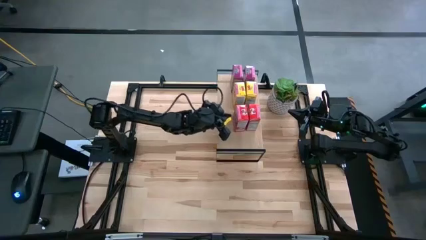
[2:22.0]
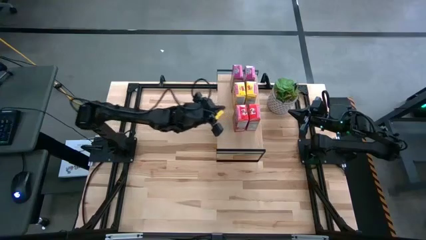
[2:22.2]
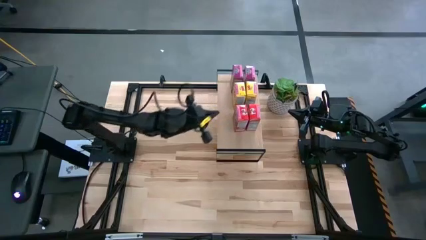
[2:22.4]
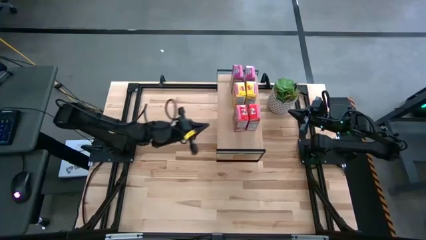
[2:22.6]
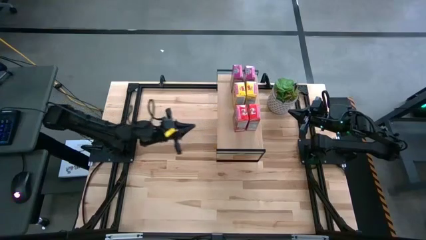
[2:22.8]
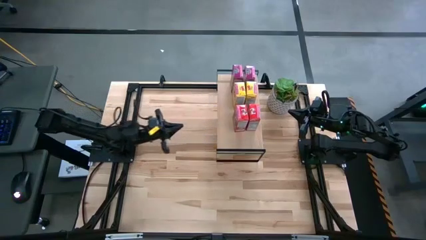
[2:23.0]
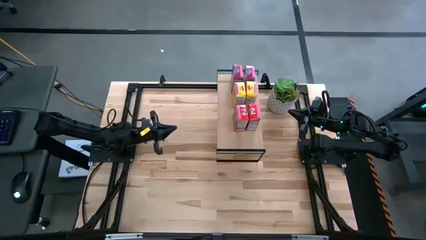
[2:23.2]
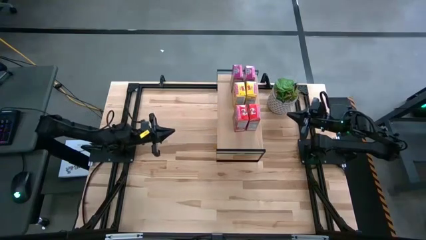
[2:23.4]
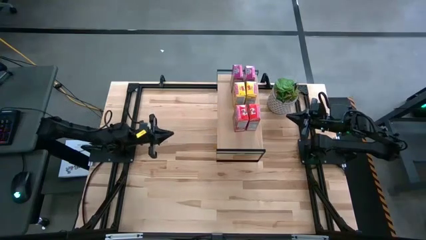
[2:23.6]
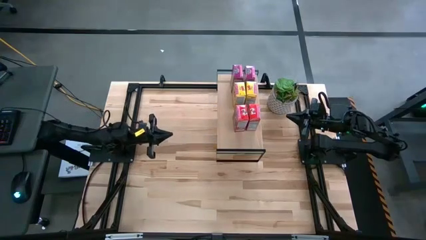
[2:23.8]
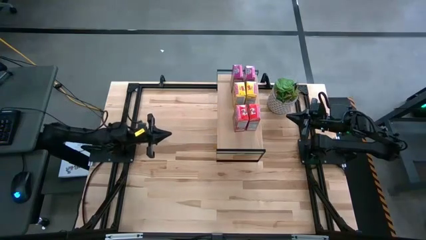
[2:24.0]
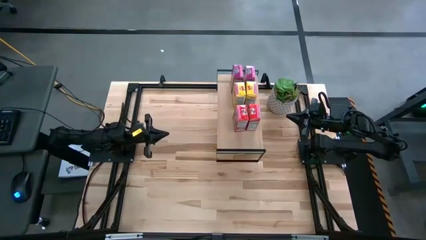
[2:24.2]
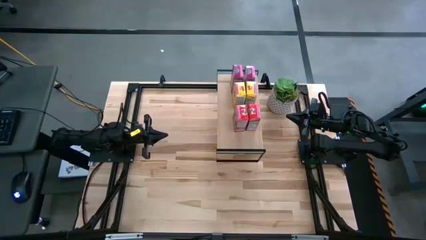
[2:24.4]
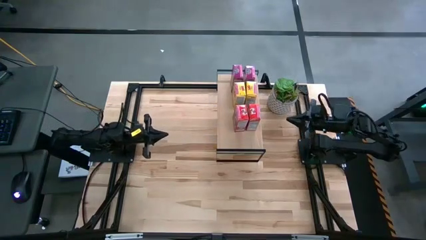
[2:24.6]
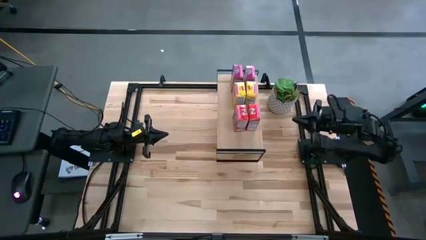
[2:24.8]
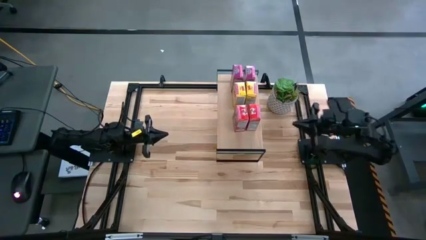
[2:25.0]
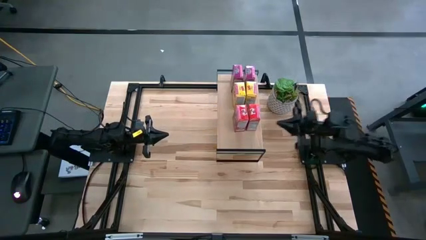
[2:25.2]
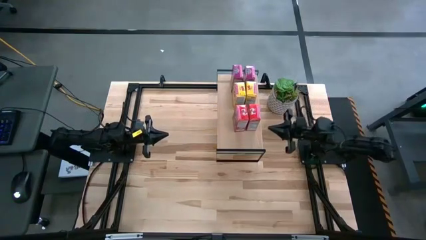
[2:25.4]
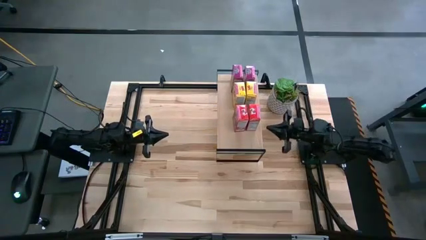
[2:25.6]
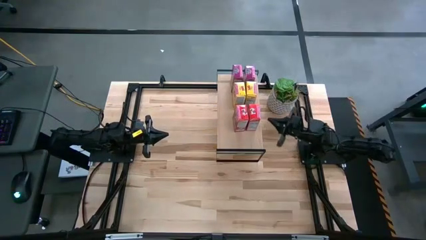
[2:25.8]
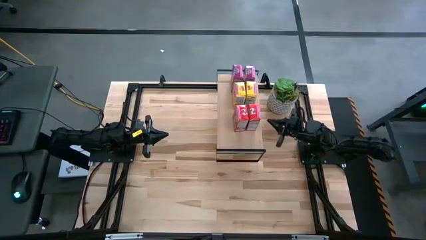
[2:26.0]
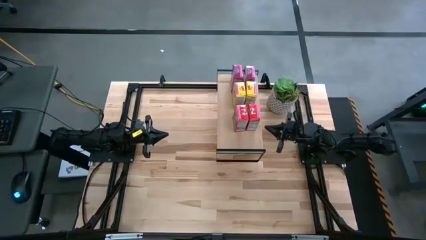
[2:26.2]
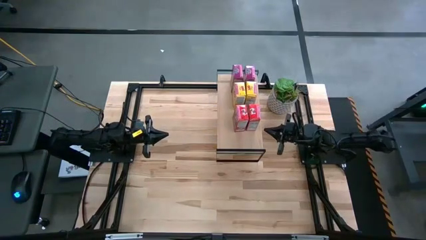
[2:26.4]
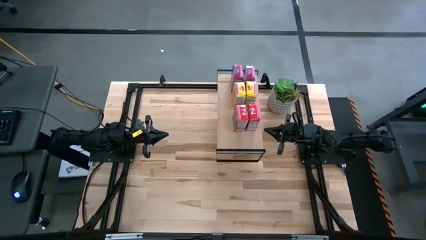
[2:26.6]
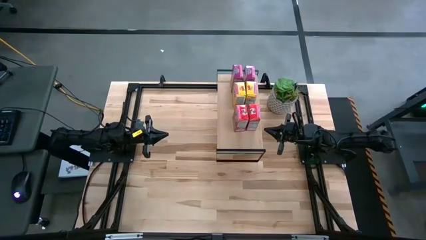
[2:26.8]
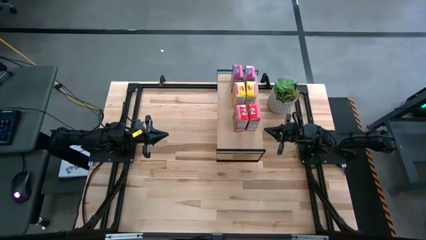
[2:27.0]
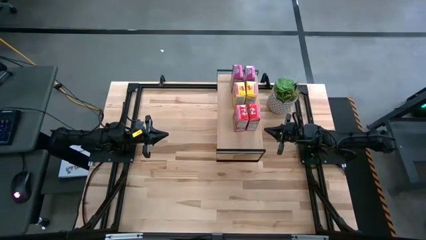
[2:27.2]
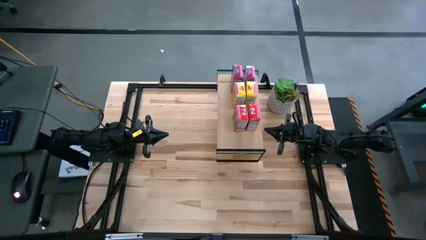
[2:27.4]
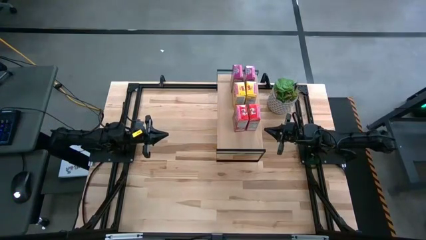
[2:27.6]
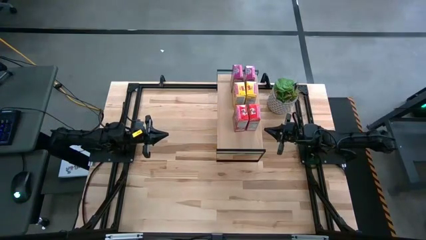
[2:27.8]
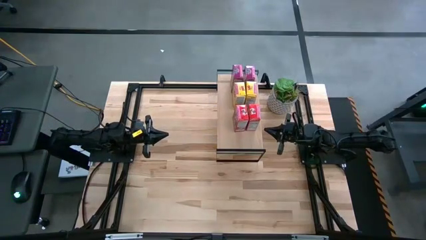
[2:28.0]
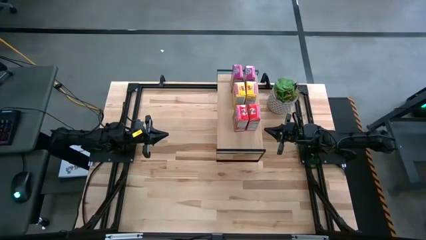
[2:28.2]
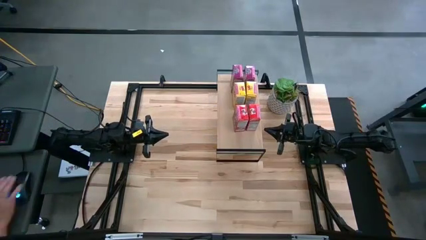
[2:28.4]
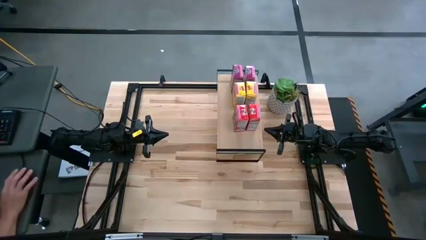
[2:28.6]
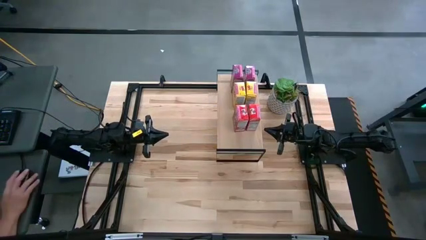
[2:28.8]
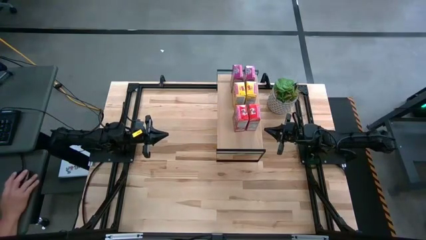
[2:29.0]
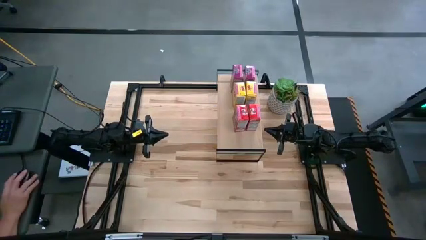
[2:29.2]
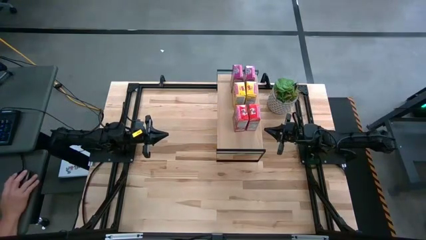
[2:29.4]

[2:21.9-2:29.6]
Task: Stack cereal on shelf
Return to Home Position

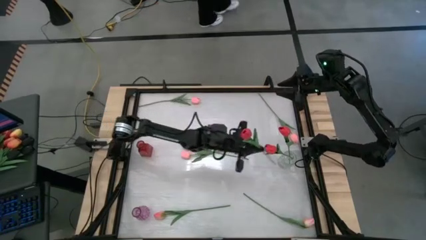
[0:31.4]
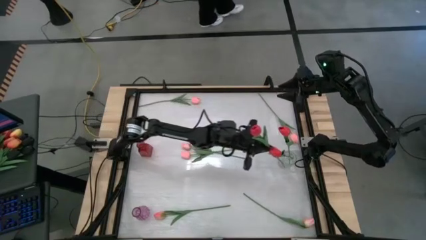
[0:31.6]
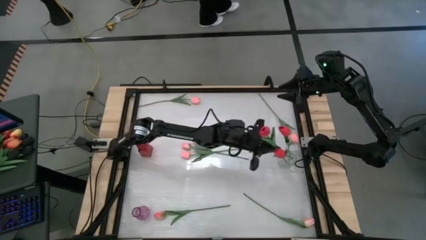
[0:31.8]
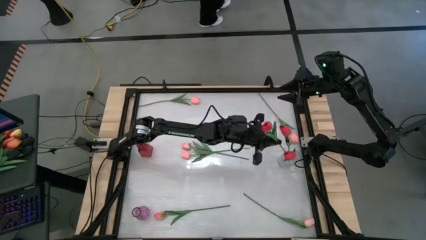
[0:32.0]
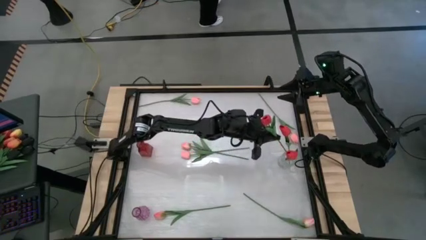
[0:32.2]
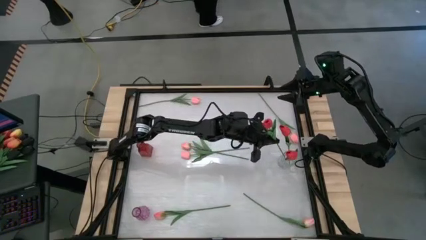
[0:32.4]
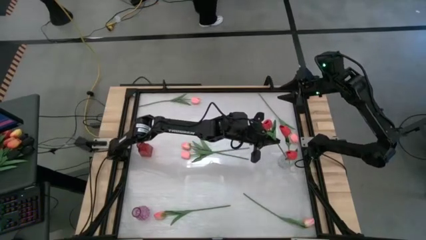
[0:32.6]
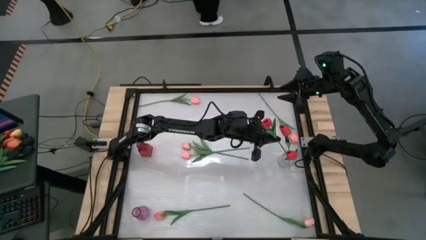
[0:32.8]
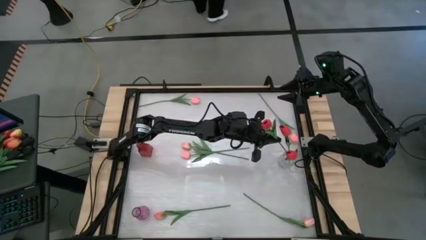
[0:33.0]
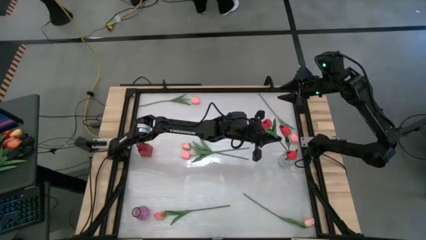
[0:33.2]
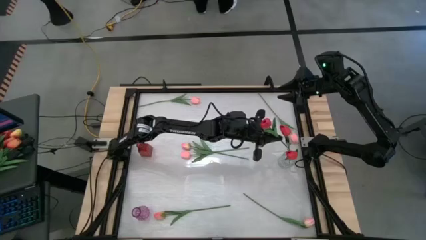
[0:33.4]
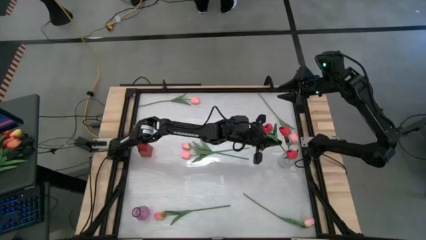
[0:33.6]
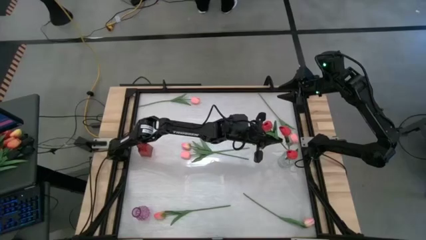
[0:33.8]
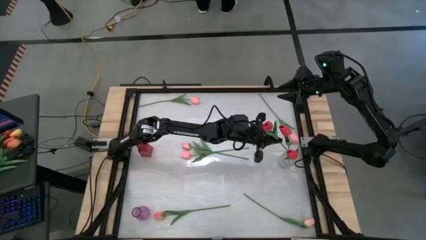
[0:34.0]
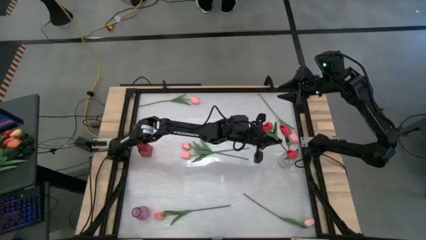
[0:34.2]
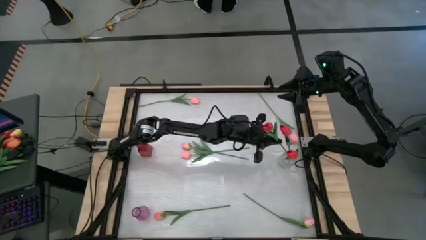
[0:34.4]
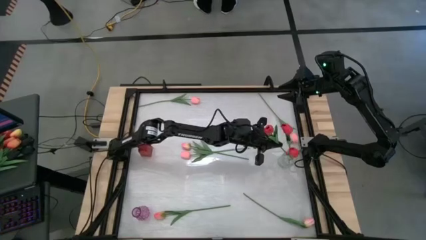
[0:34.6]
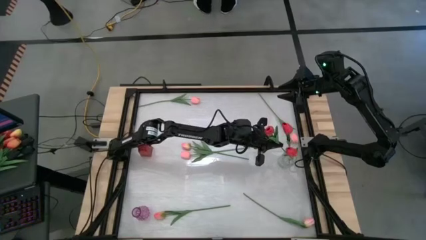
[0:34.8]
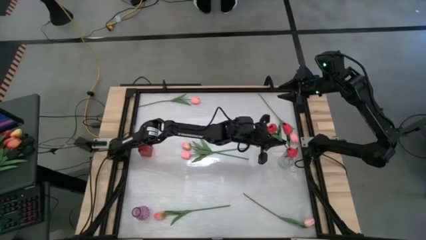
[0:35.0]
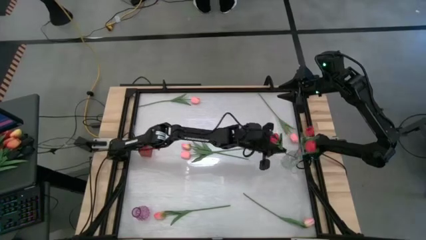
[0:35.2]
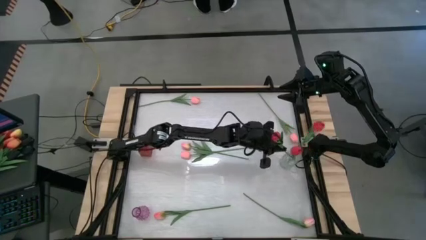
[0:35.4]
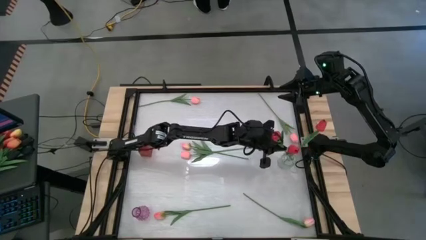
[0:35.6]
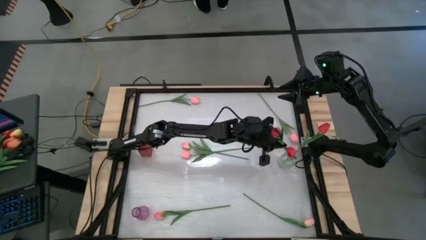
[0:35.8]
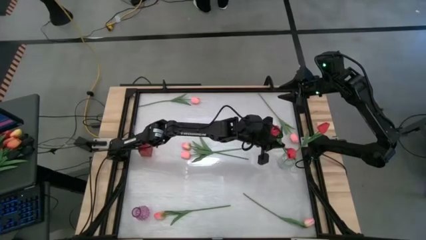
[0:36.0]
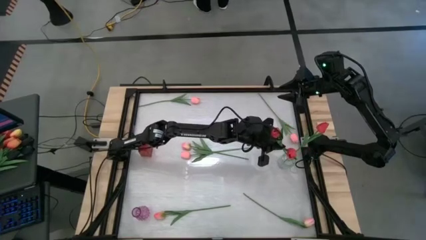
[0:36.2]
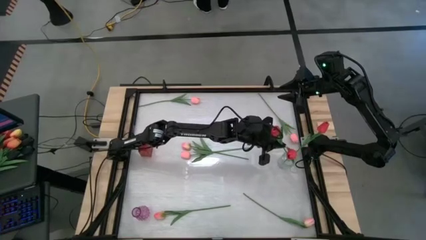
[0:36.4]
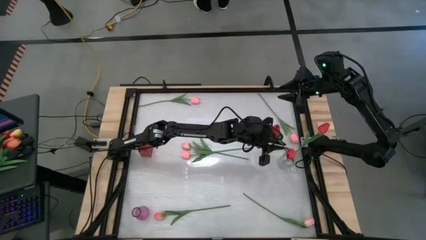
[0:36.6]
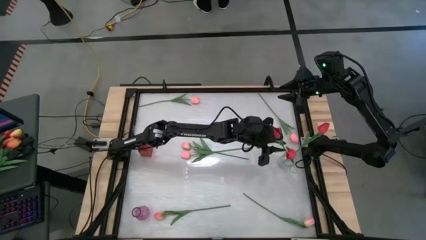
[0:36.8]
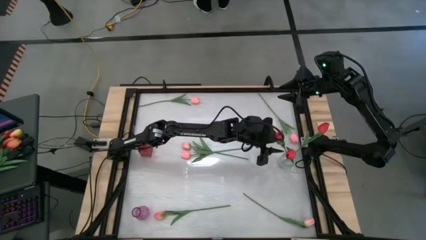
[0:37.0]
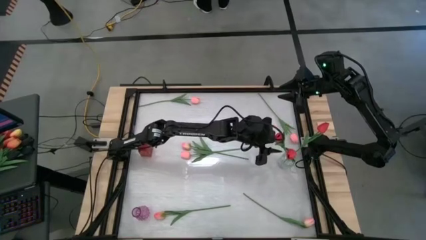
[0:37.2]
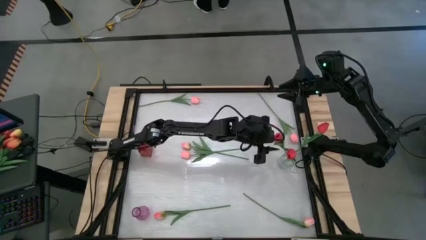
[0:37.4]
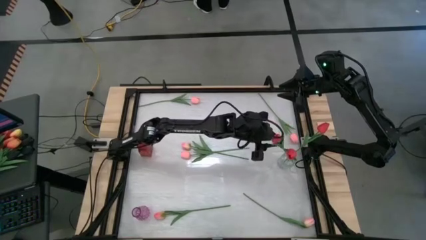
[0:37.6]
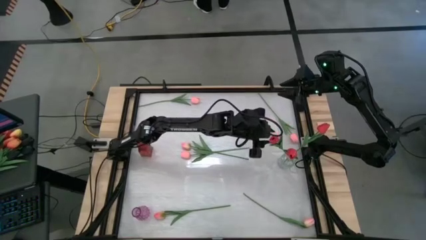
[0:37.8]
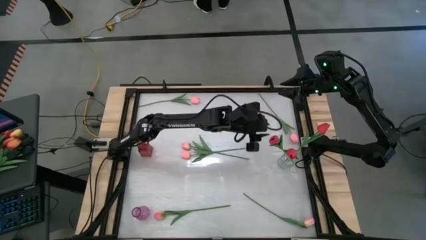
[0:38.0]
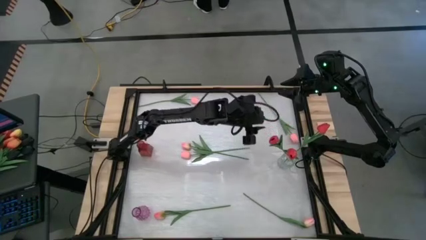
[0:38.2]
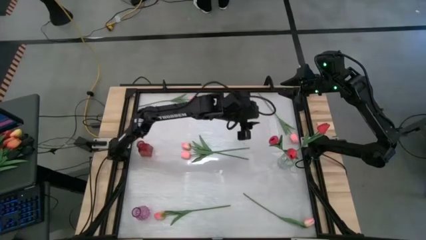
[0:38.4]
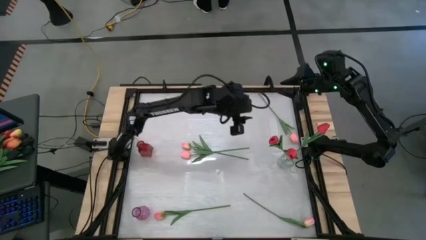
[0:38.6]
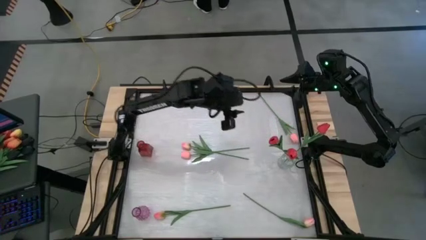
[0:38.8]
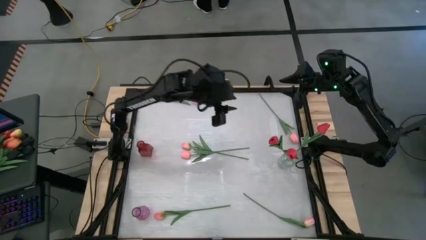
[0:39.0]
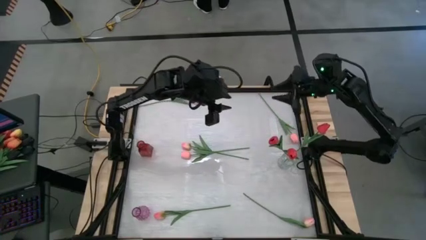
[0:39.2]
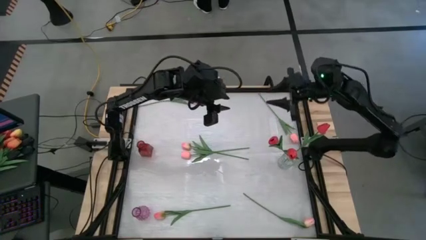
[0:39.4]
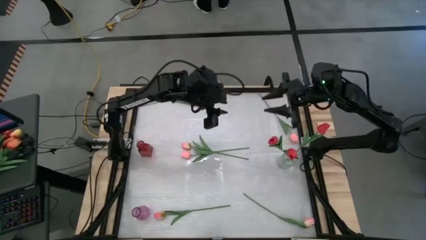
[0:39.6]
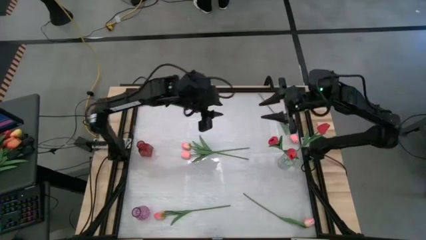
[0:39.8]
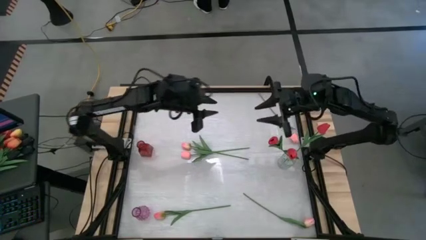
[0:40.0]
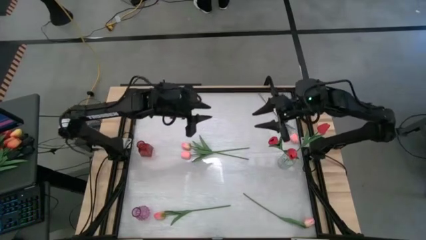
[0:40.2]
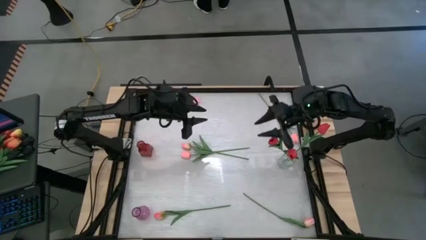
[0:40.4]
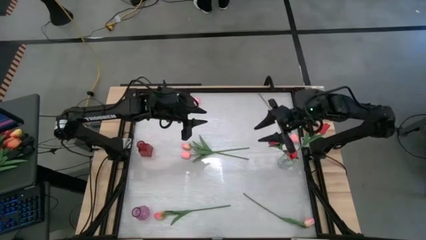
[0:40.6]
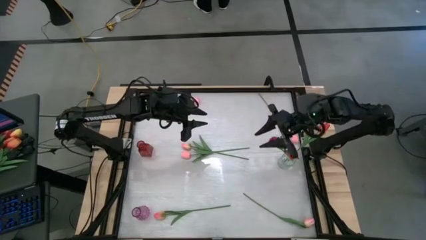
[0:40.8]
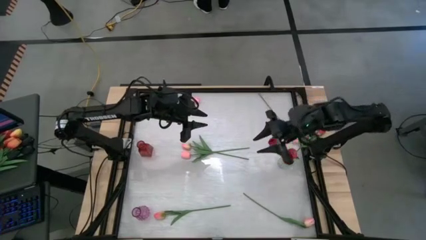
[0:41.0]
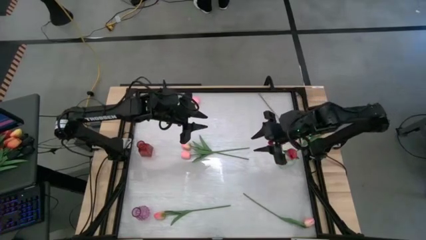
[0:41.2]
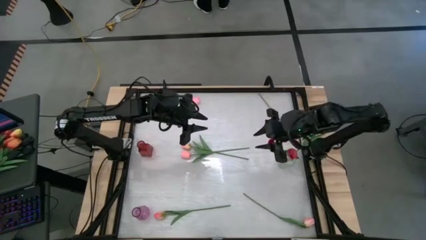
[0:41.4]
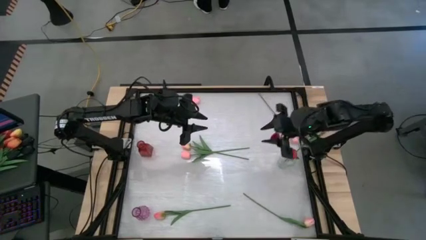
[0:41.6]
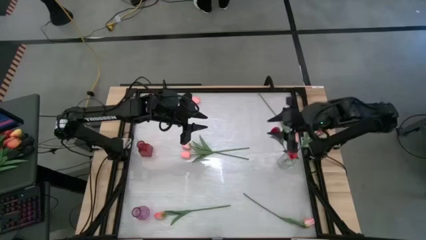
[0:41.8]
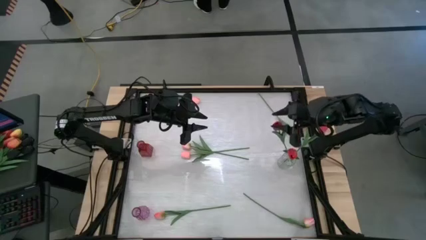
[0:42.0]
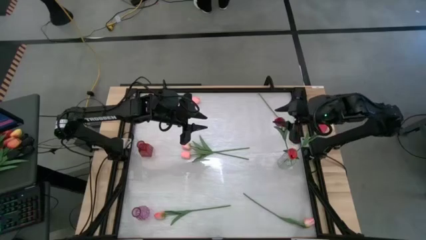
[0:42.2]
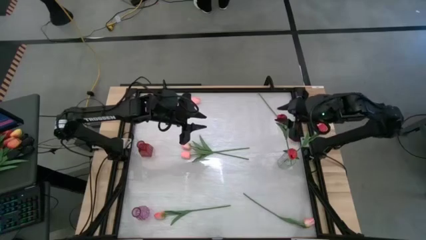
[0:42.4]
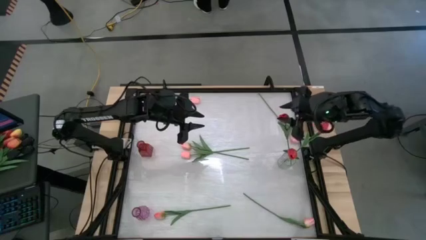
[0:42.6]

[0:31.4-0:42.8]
Task: Sort flowers into vase by color
Put the red flower into the transparent flower vase
